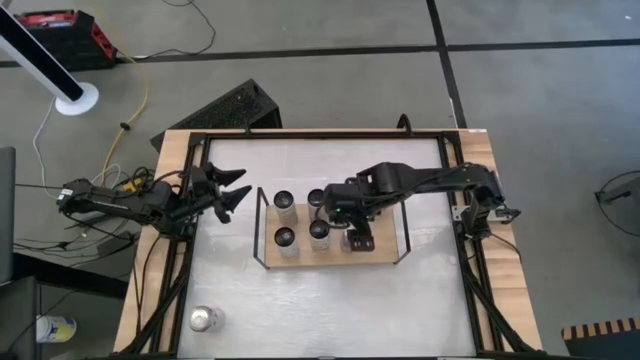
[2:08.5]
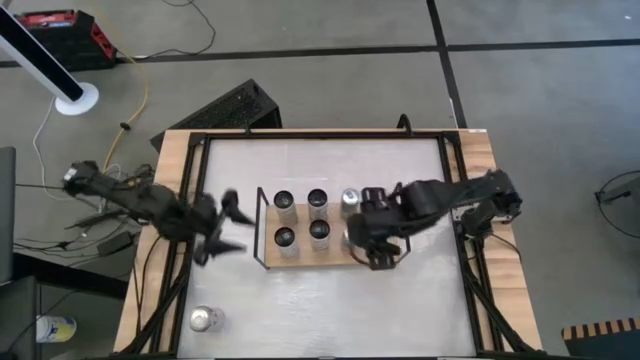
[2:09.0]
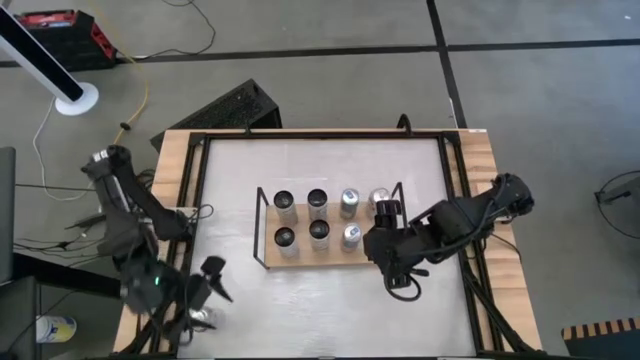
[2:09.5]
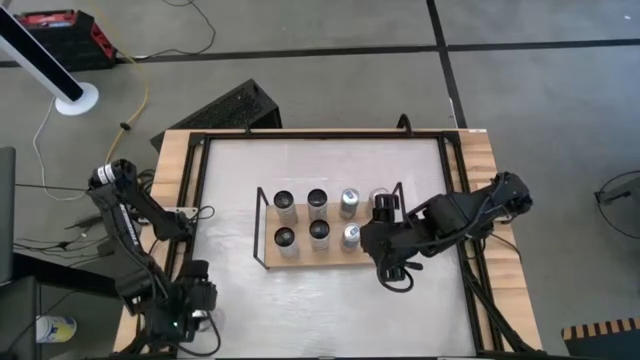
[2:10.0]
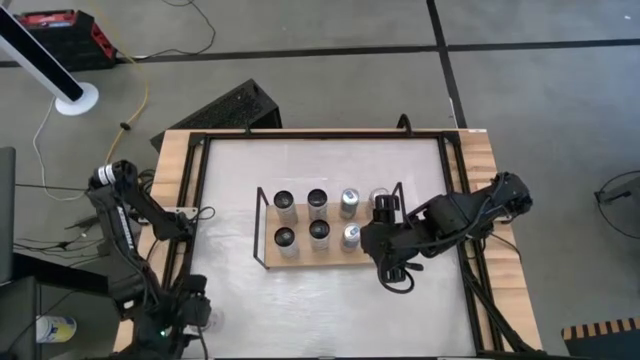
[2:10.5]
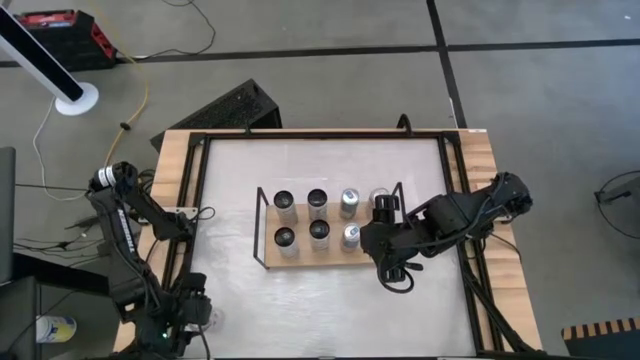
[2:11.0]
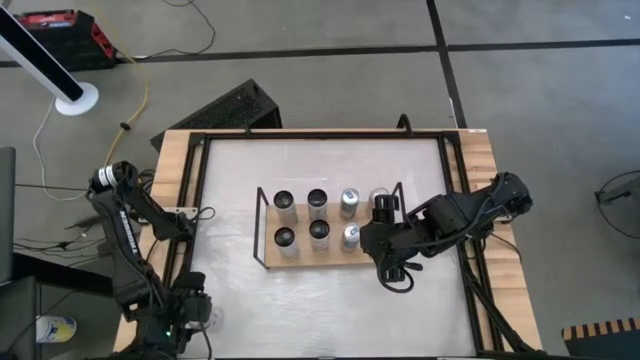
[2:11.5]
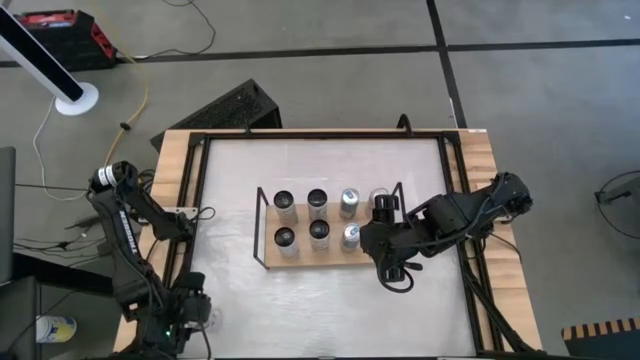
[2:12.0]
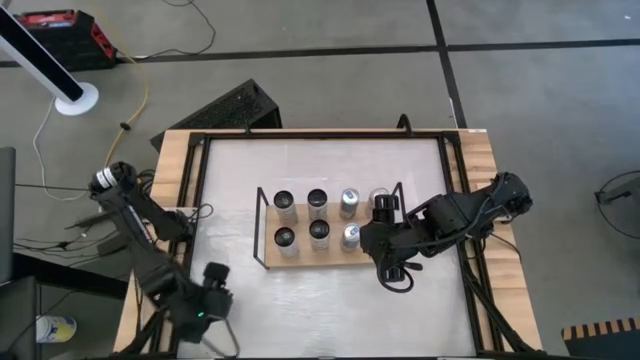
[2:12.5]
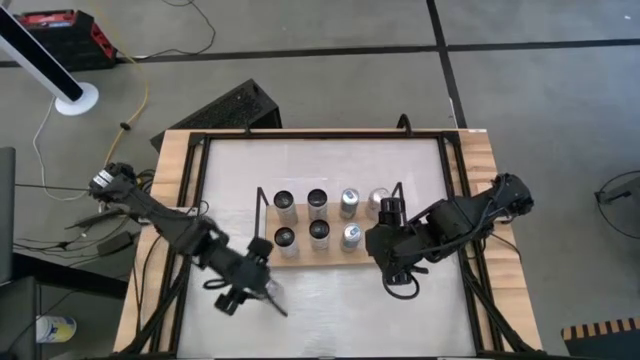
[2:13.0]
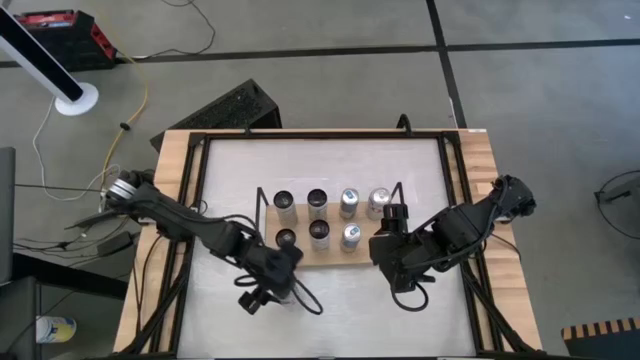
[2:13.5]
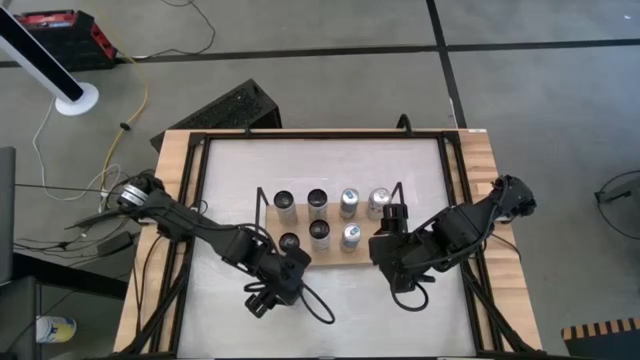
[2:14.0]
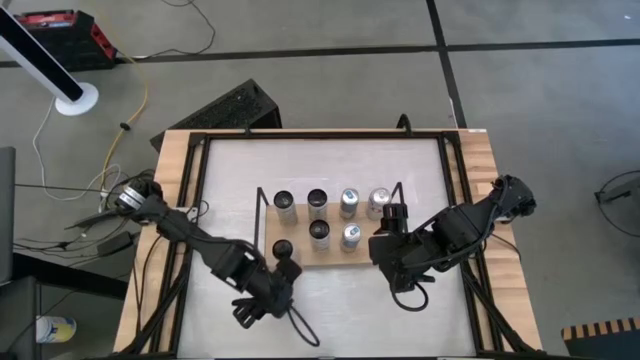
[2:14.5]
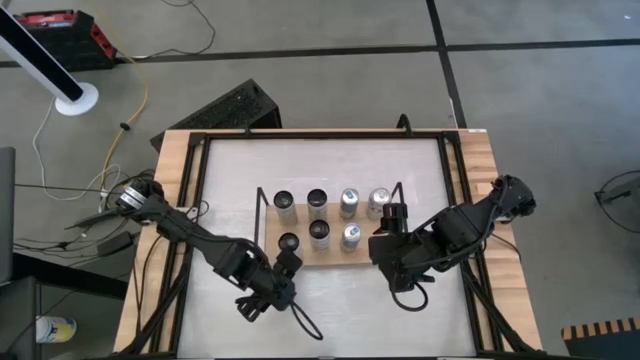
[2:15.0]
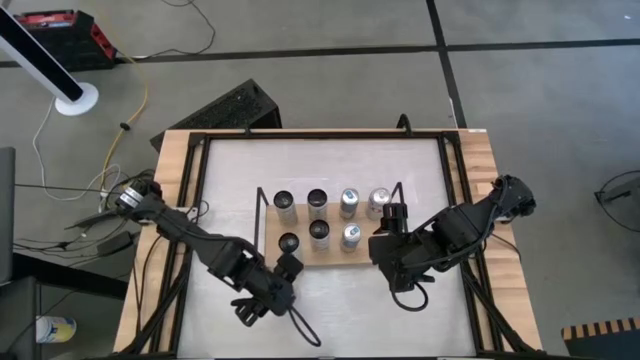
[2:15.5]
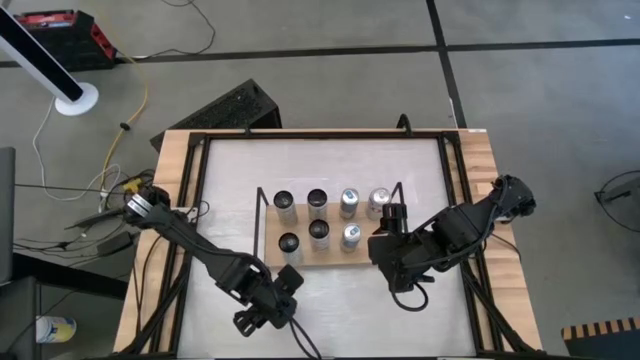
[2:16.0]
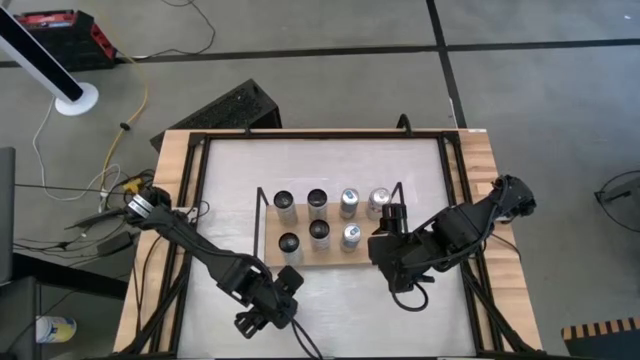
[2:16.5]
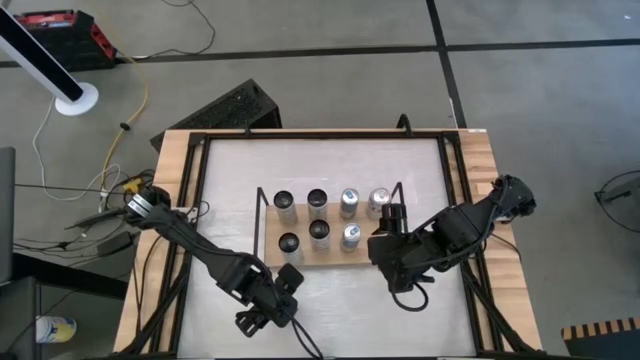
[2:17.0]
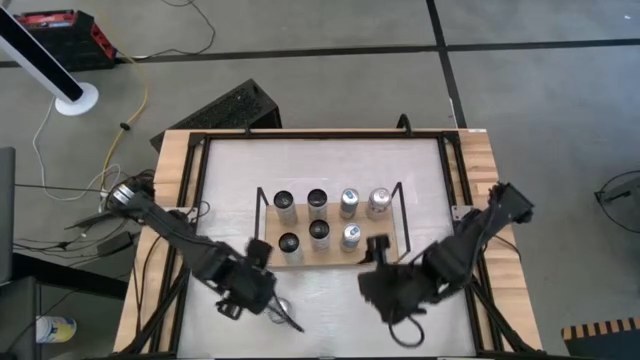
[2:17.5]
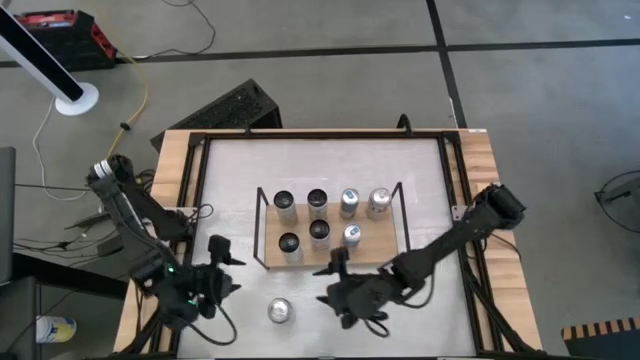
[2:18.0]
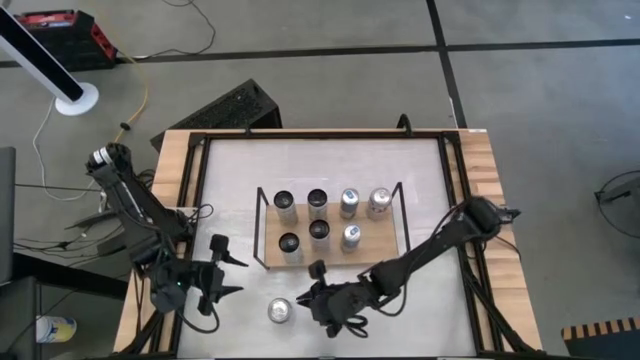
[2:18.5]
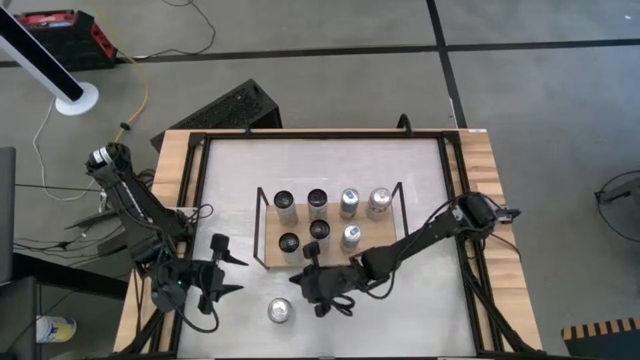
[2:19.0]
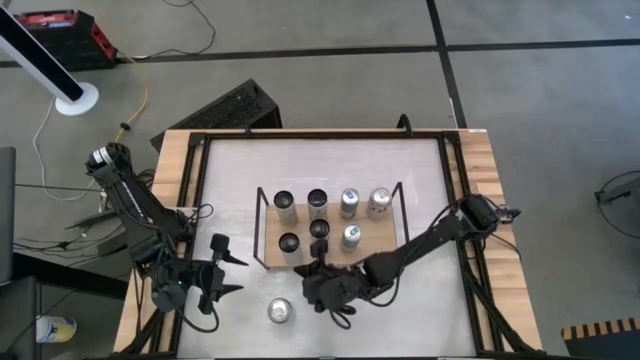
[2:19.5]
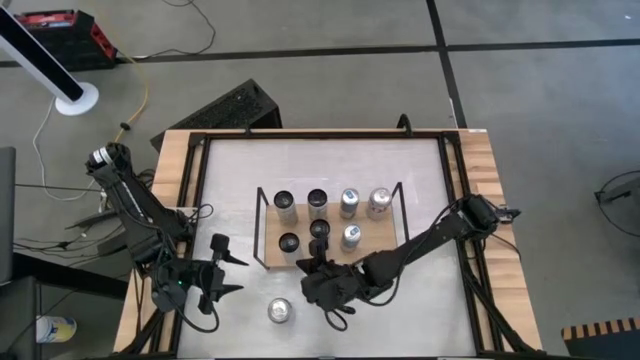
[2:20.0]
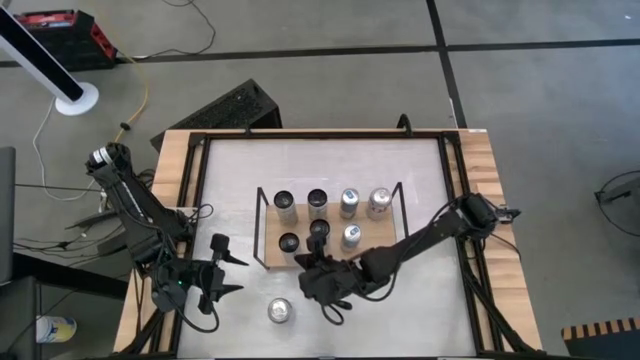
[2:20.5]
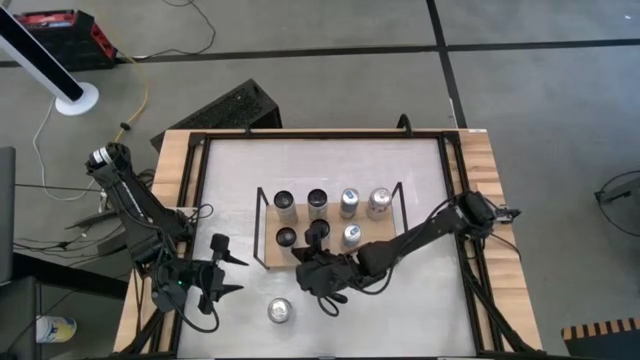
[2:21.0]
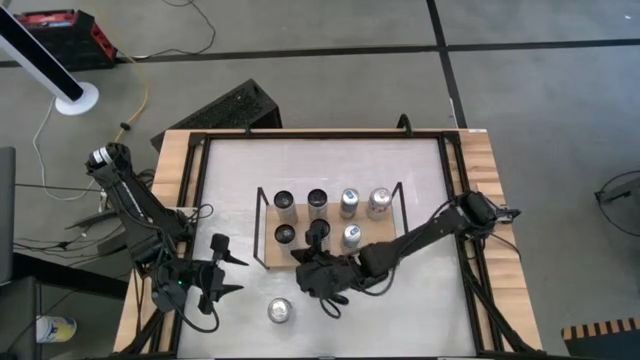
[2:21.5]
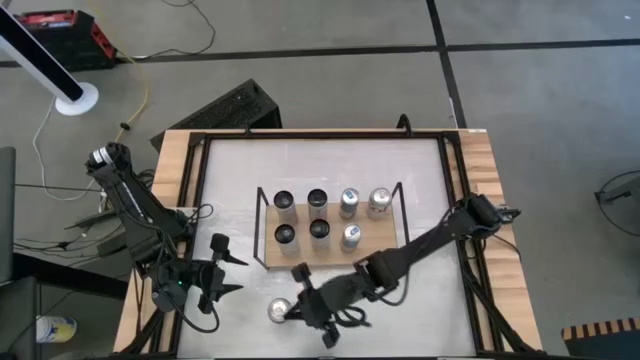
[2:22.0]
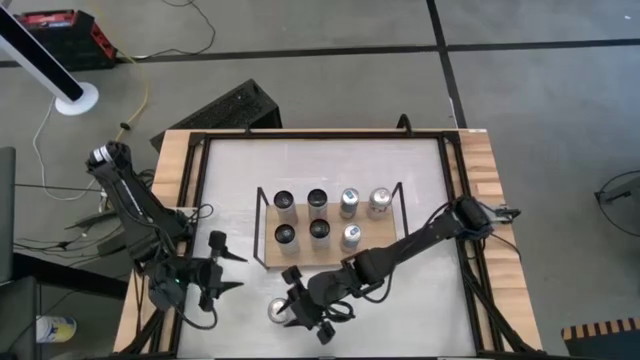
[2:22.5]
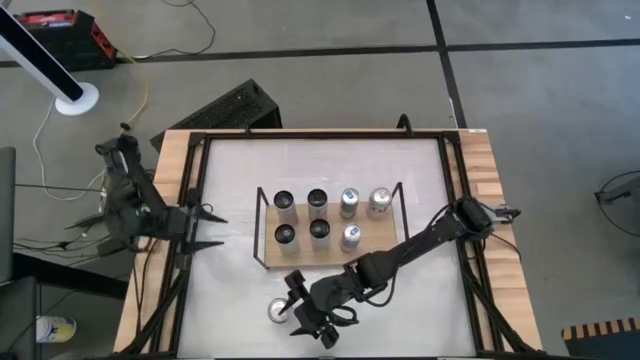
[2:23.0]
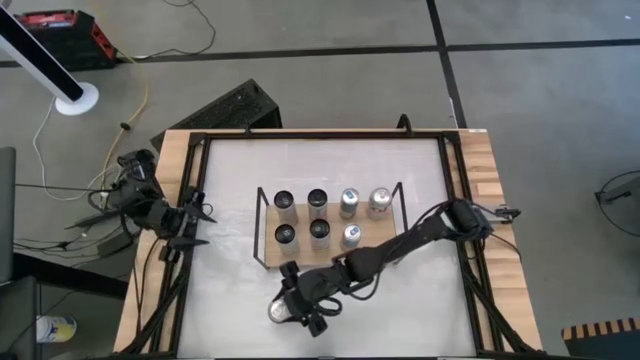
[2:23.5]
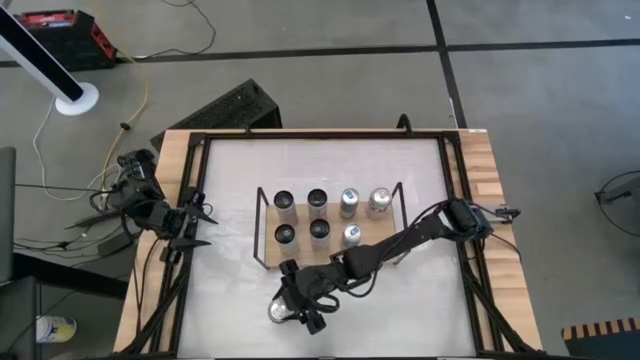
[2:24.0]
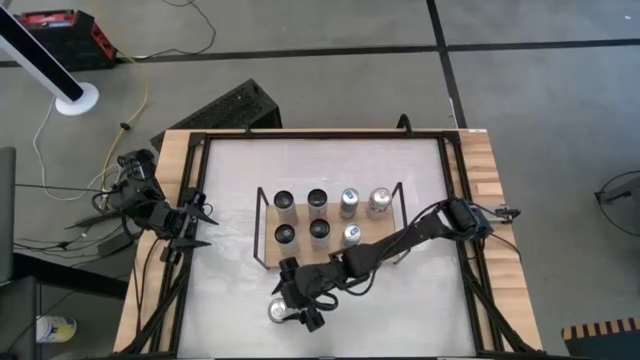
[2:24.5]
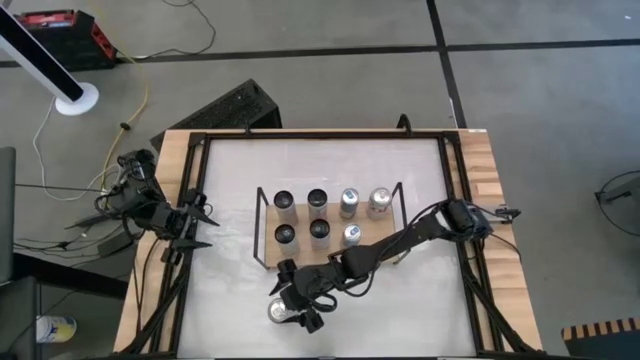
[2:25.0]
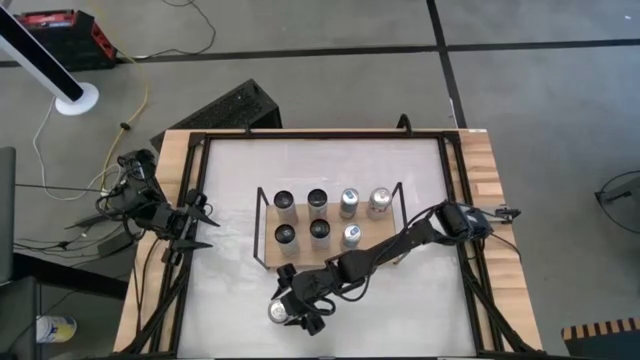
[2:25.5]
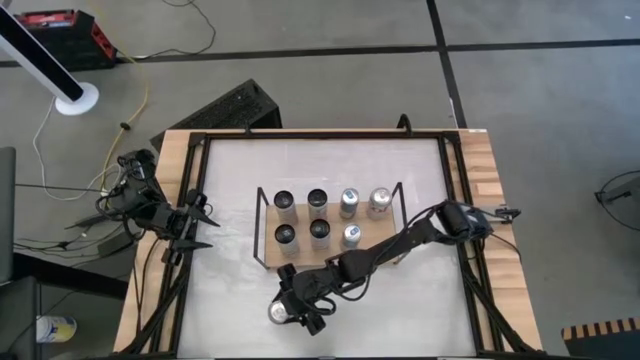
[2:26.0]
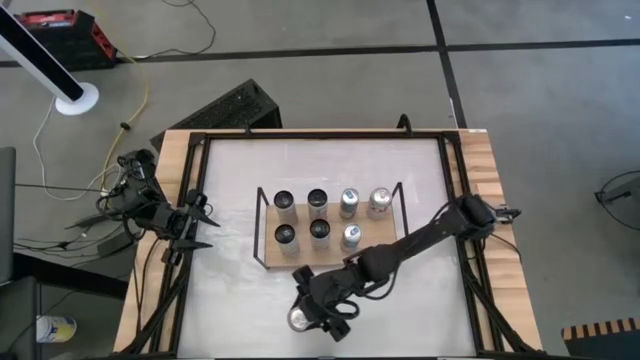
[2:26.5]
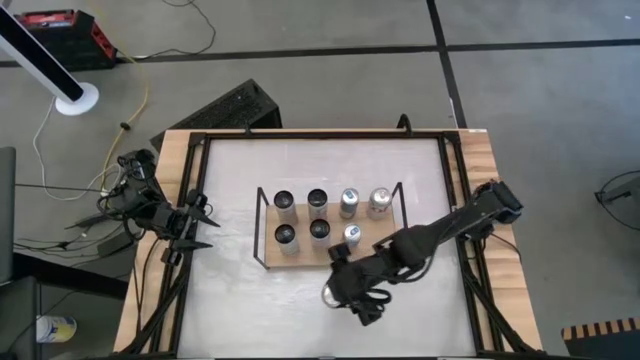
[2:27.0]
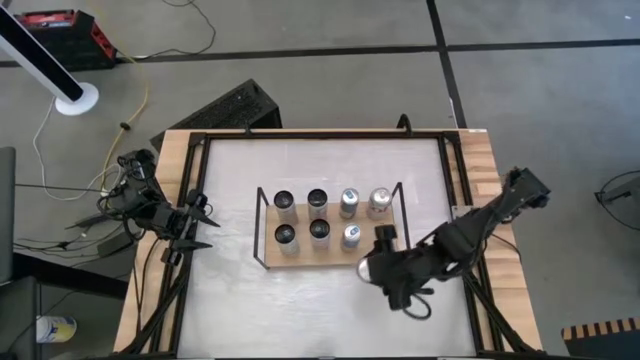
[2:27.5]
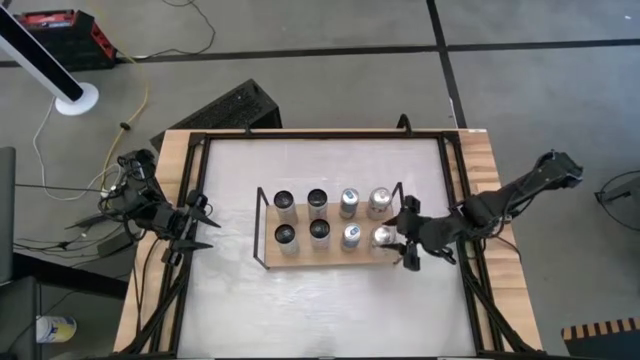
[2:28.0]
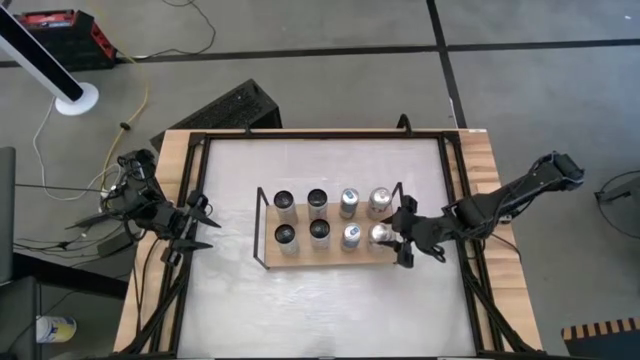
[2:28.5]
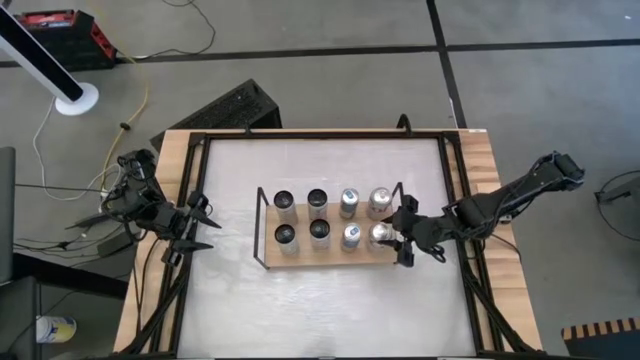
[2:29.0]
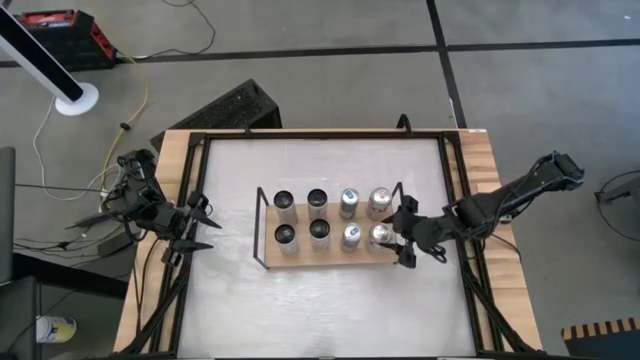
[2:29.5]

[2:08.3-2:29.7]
Task: Place canned beverage on shelf
Put the red-silver soda can on the shelf aligned with the other red-silver soda can
